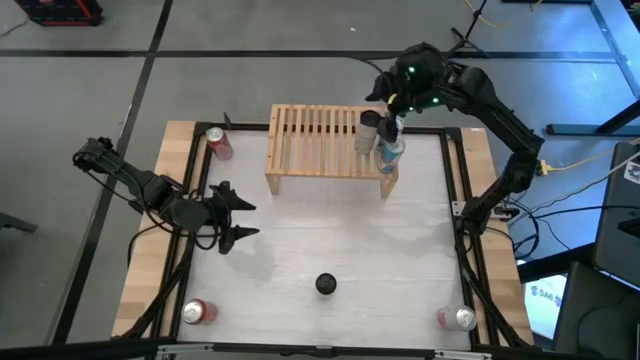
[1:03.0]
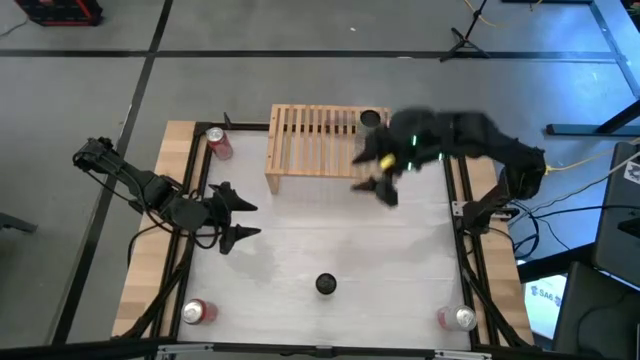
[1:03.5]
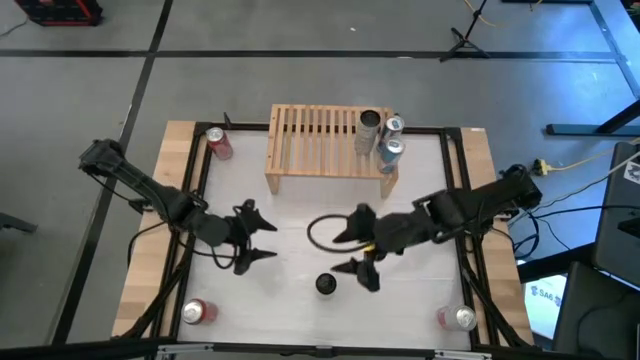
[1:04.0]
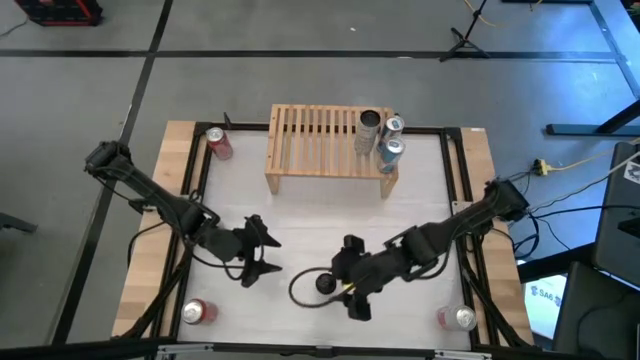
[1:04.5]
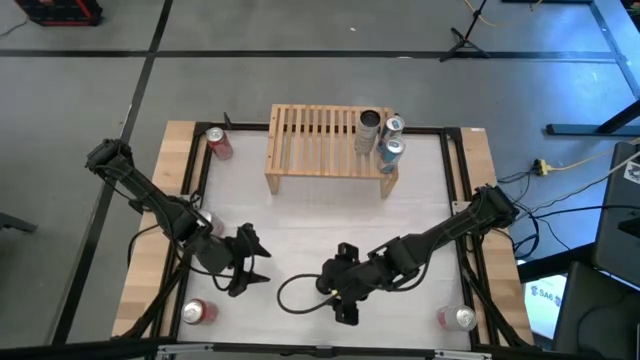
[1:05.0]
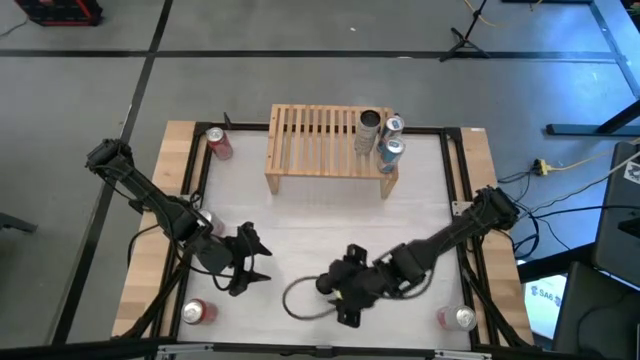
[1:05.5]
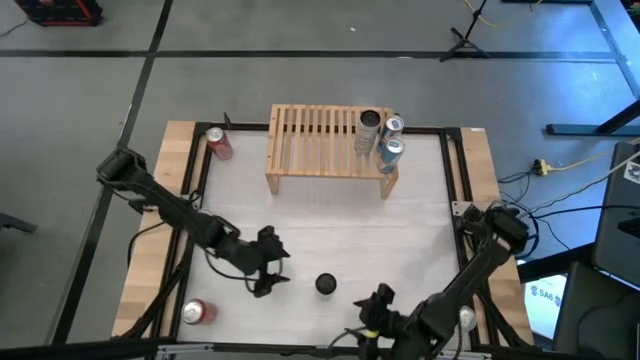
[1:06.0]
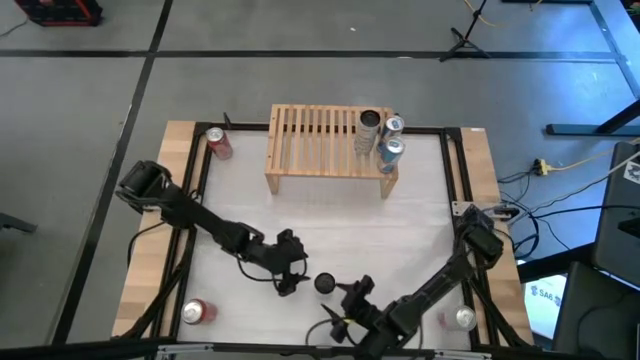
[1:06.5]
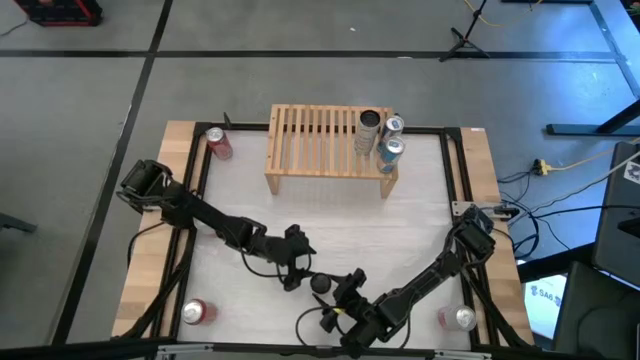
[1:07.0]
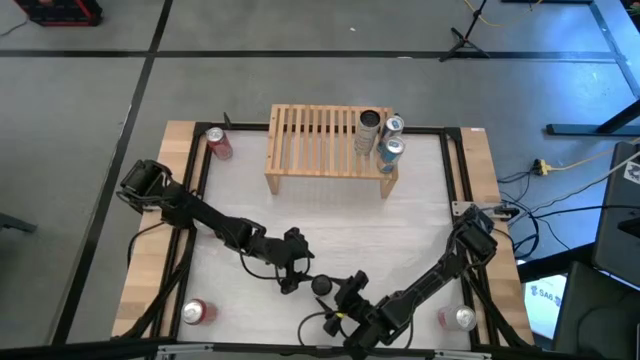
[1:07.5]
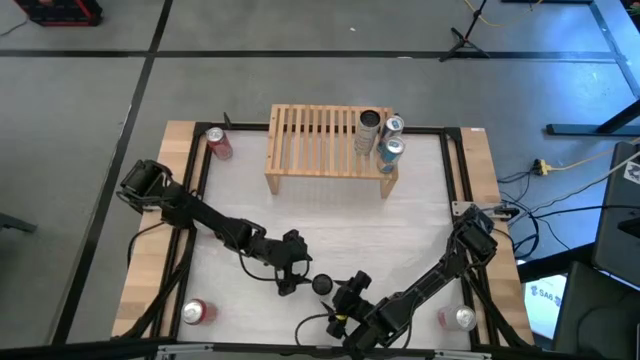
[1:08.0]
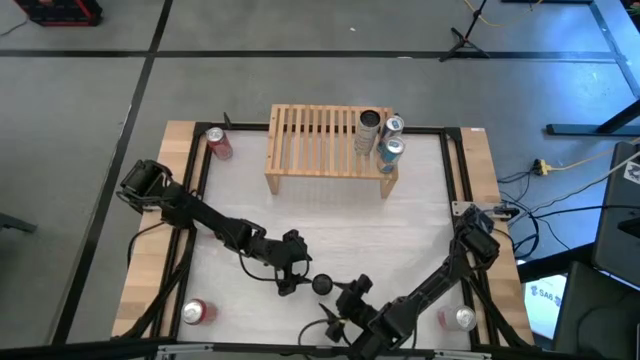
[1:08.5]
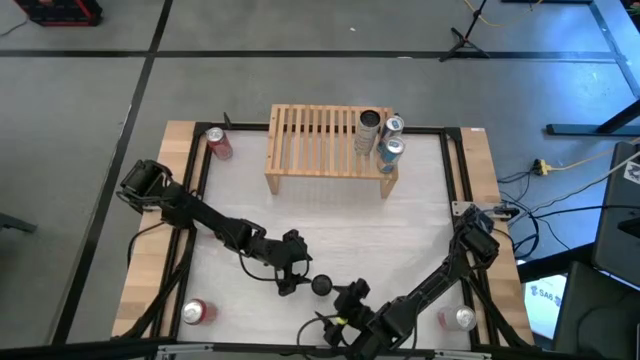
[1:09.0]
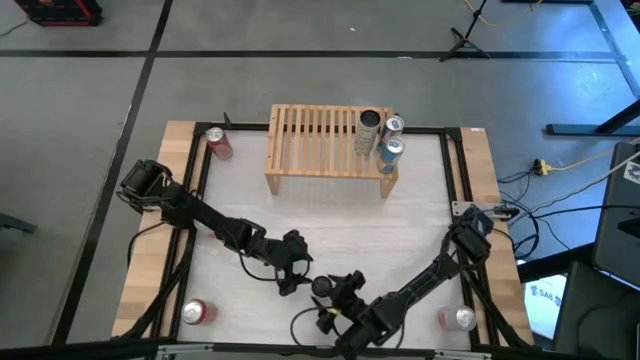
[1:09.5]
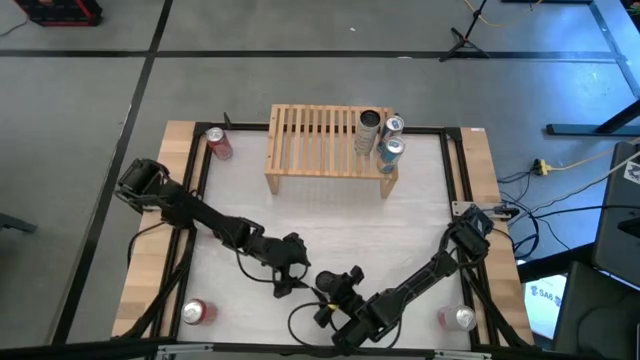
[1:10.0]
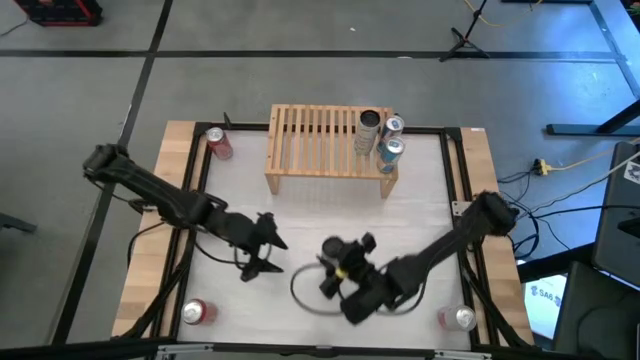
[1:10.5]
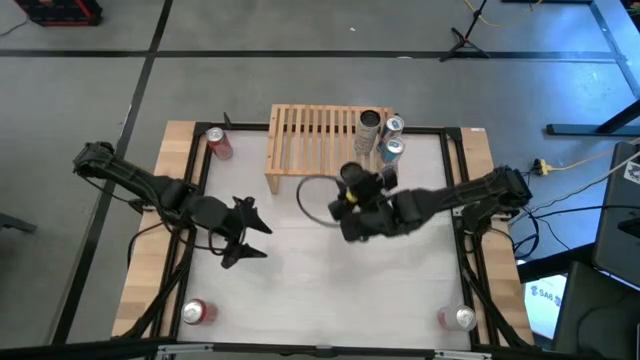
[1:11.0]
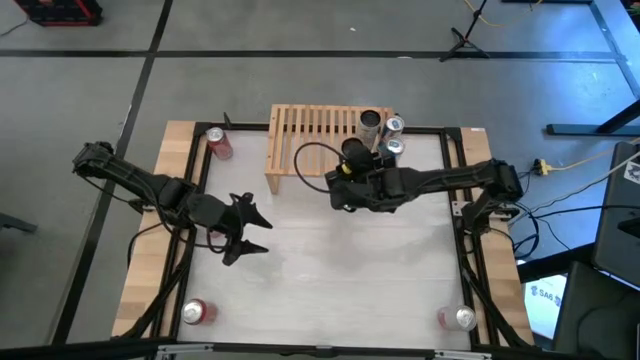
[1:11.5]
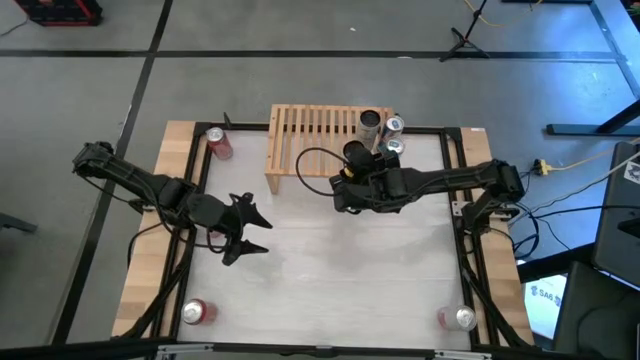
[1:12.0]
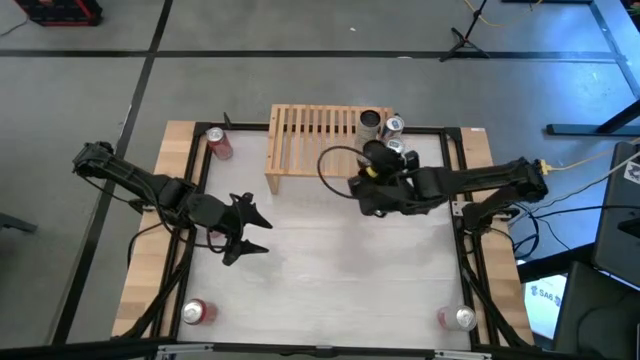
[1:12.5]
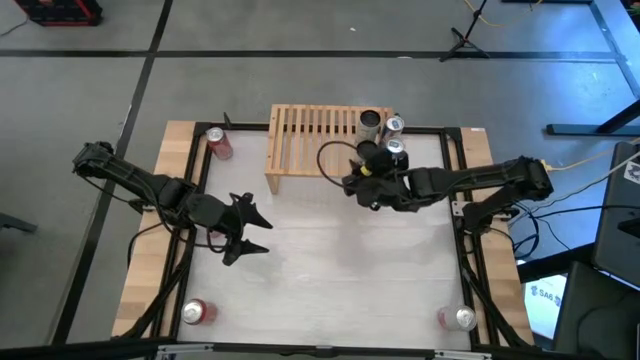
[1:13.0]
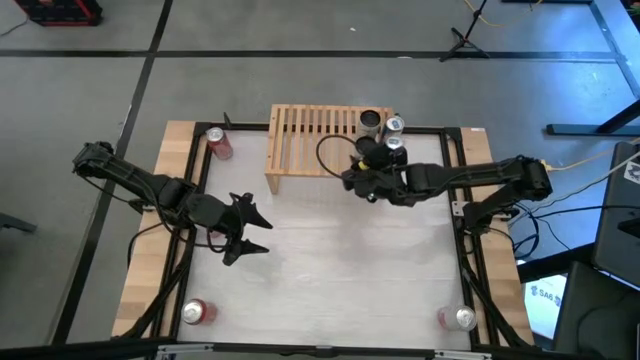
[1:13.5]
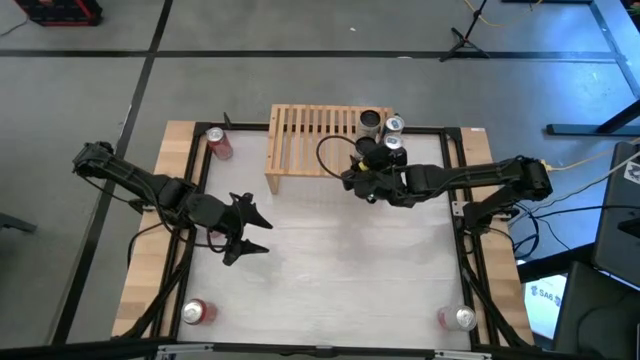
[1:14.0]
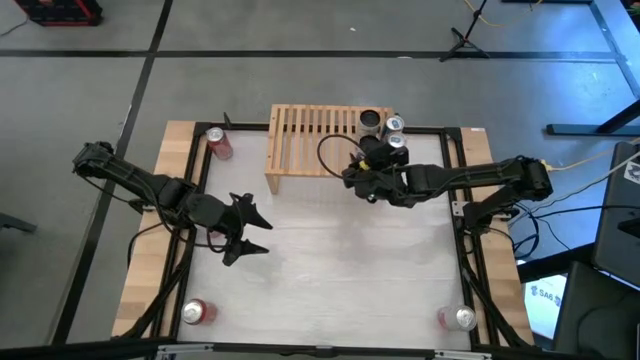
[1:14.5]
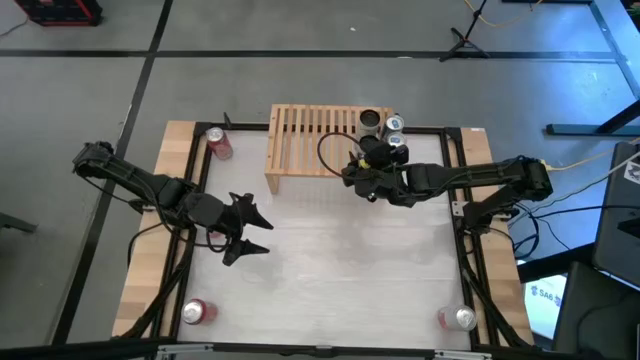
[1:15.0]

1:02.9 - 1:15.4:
Task: Place canned beverage on shelf
Put the white and yellow soda can on the shelf aligned with the other white and yellow soda can
